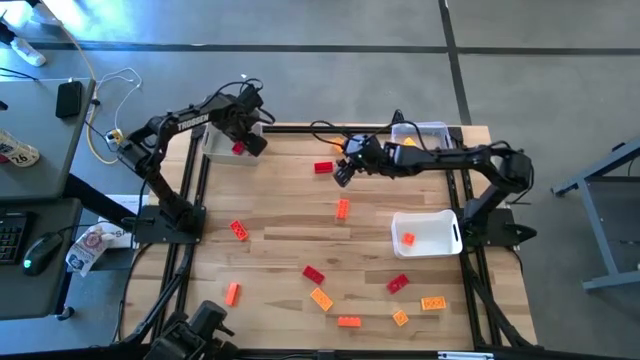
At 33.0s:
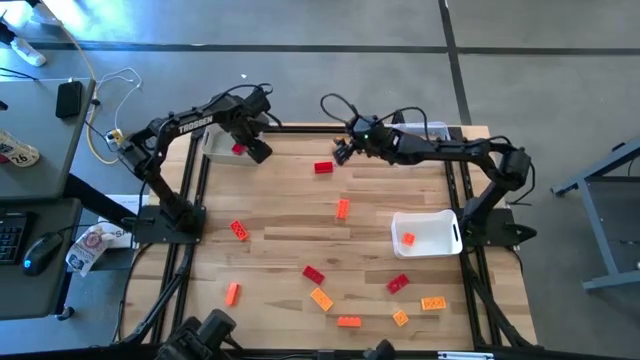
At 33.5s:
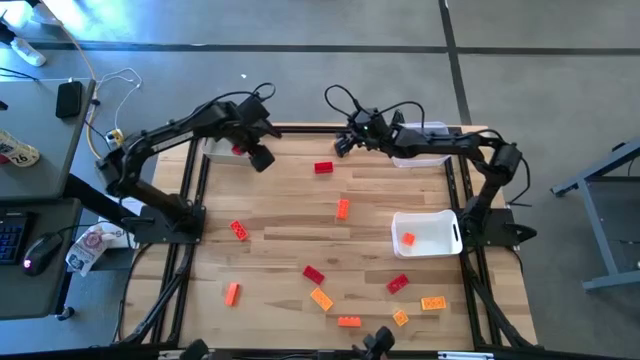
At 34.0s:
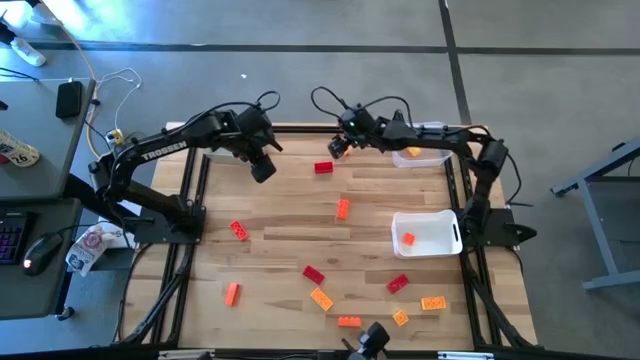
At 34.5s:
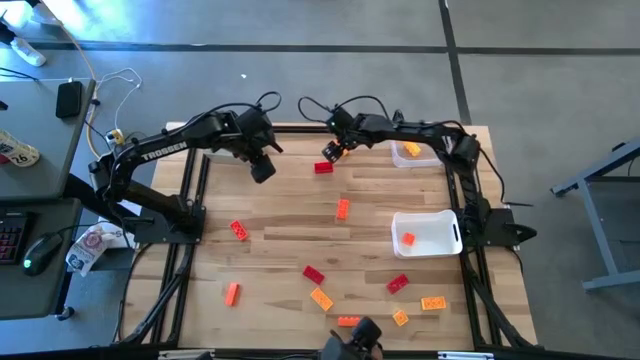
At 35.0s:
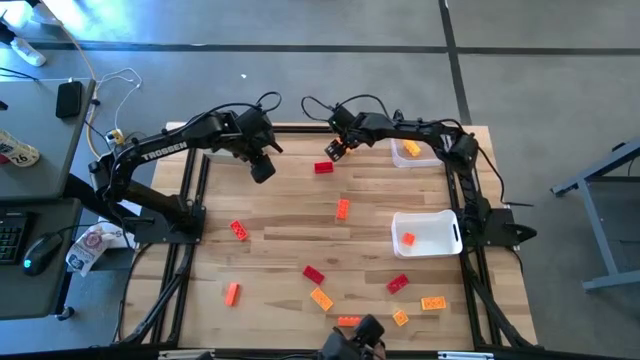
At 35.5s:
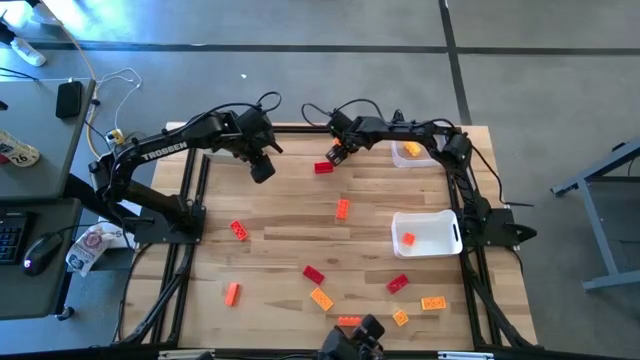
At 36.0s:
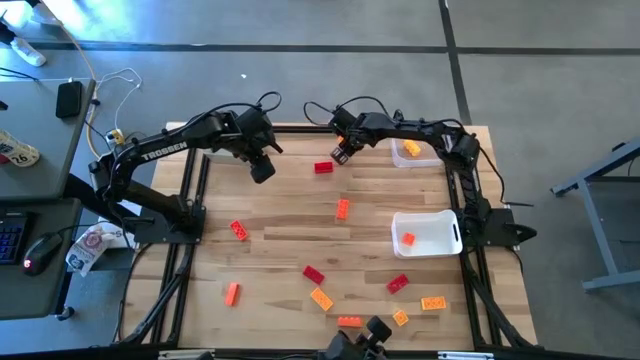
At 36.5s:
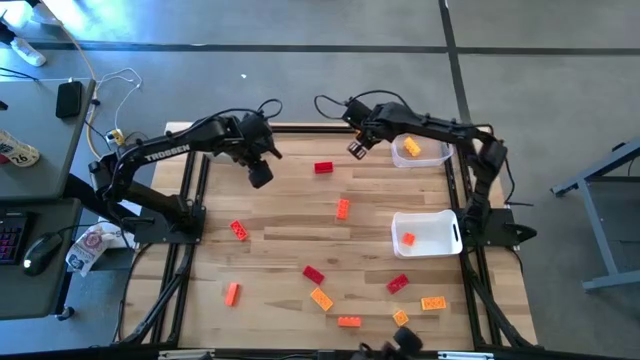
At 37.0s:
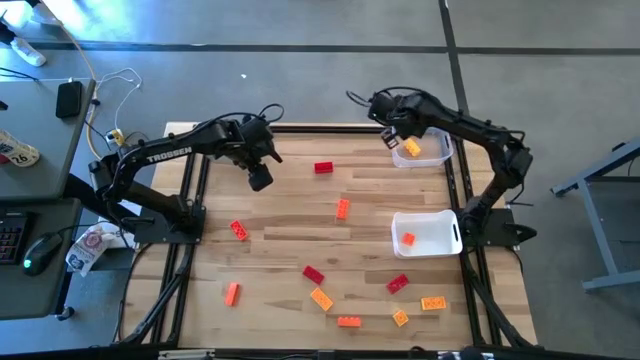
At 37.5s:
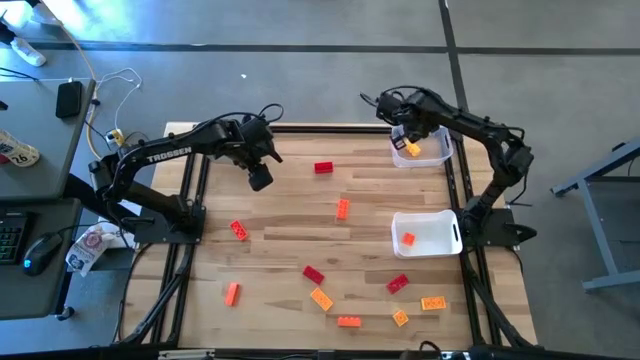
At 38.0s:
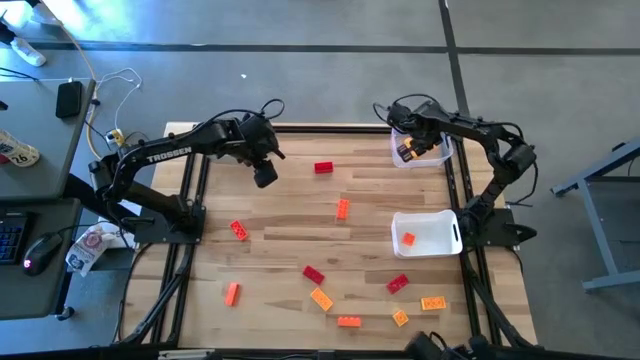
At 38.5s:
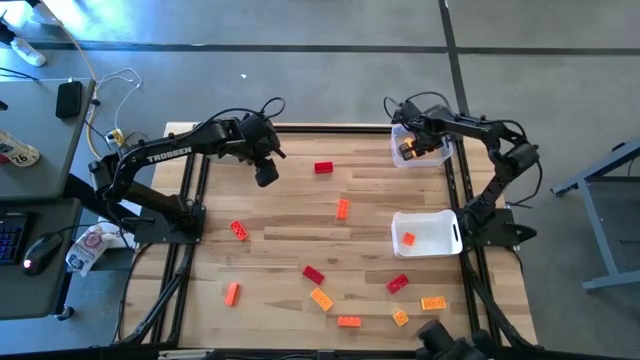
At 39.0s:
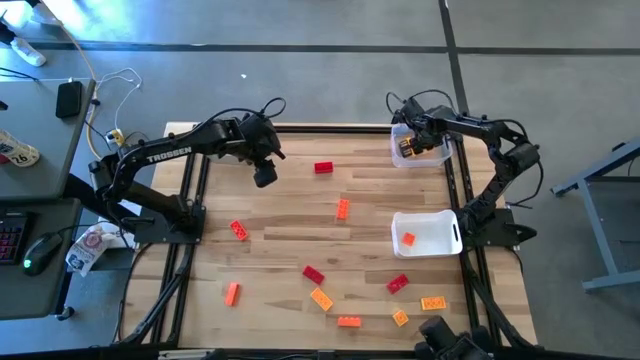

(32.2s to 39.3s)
Task: Sort & place blocks by color
Put the yellow game piece into the transparent bin

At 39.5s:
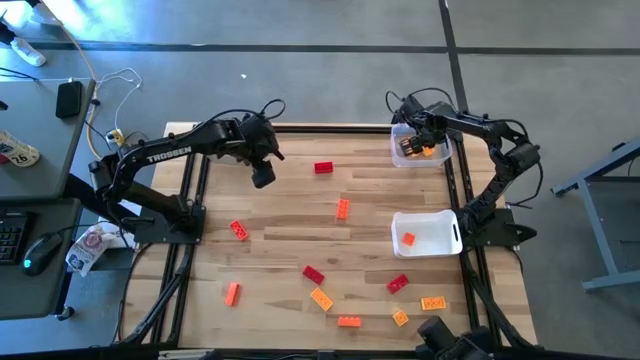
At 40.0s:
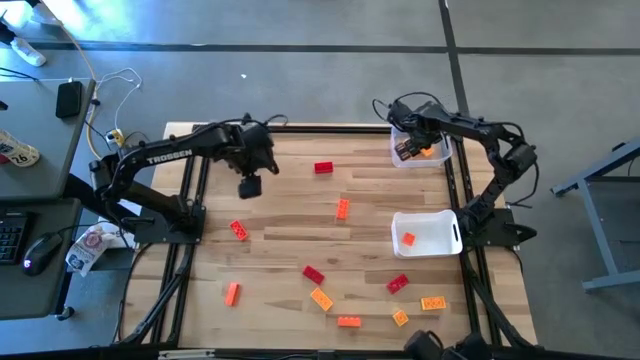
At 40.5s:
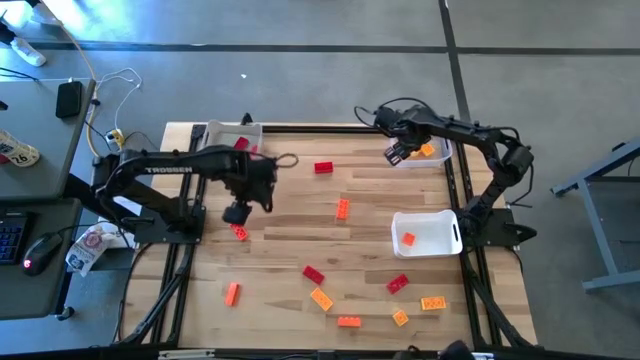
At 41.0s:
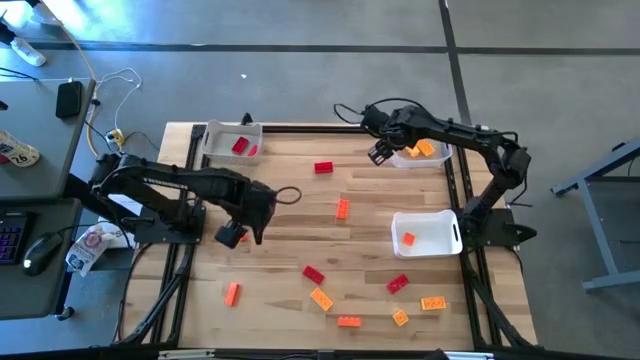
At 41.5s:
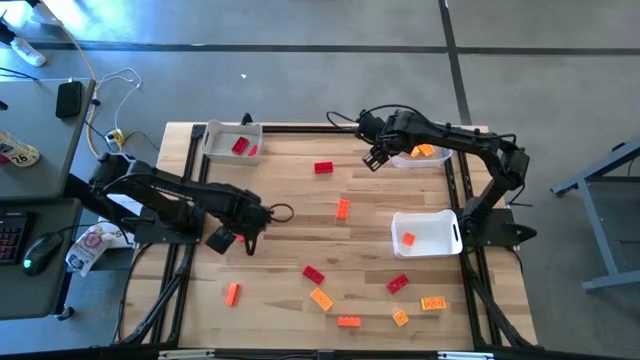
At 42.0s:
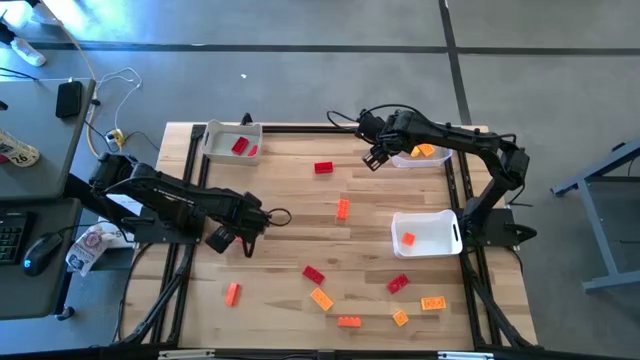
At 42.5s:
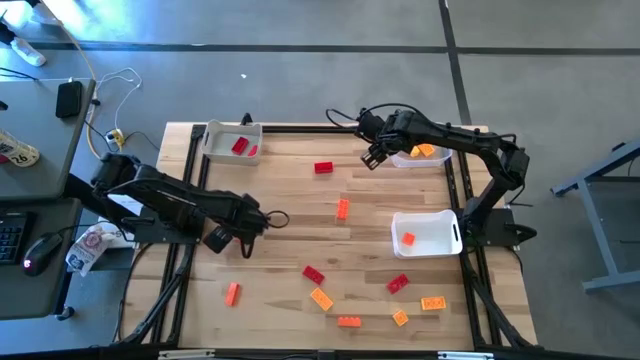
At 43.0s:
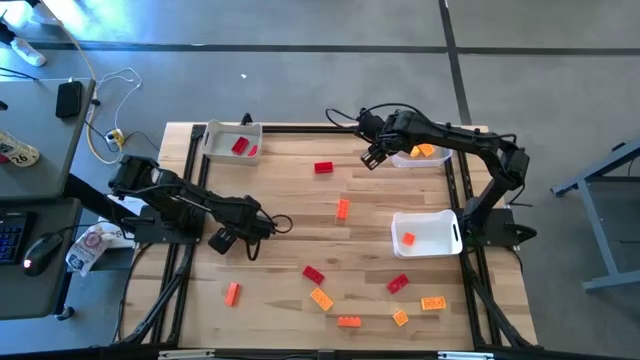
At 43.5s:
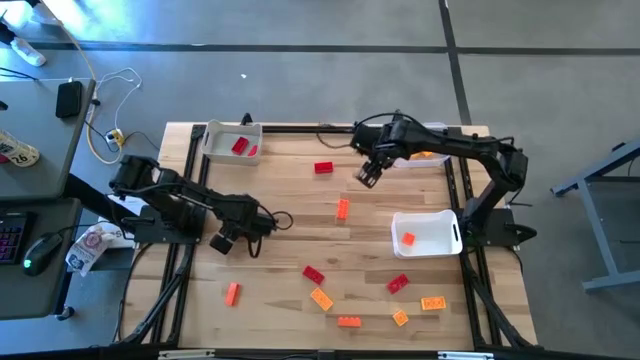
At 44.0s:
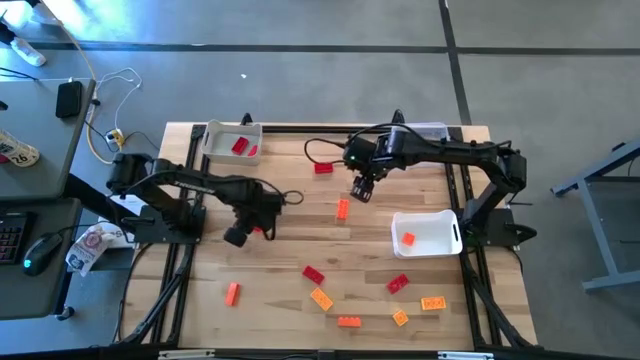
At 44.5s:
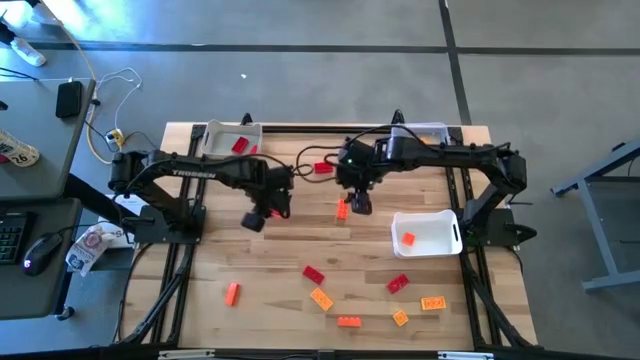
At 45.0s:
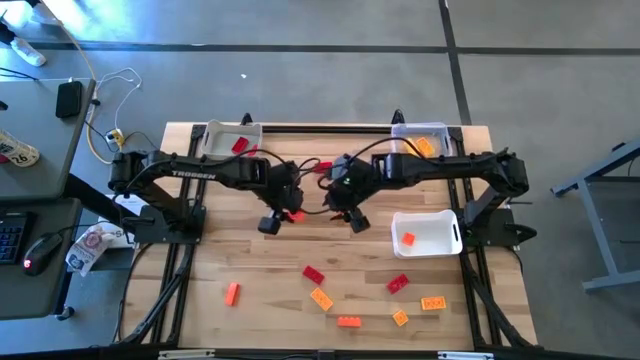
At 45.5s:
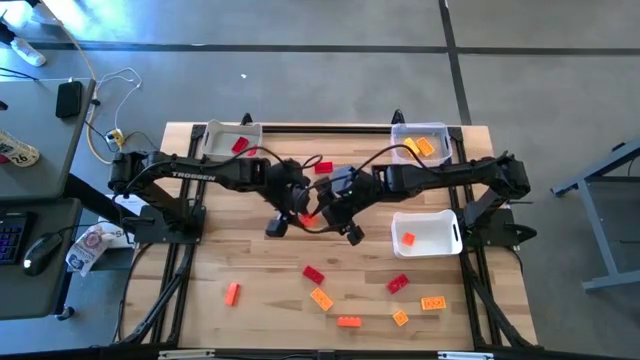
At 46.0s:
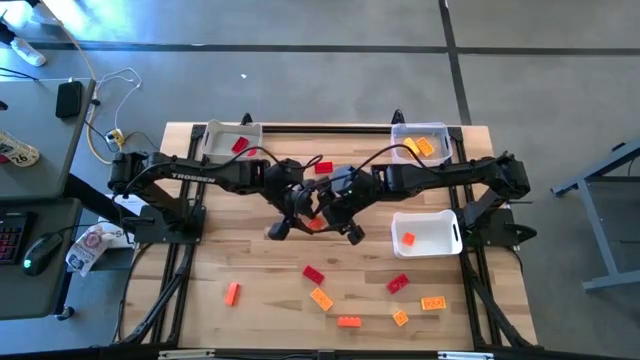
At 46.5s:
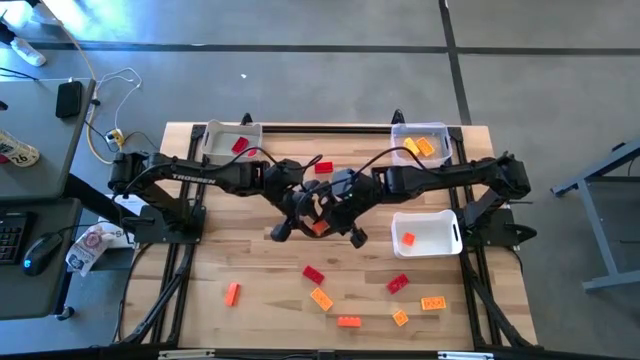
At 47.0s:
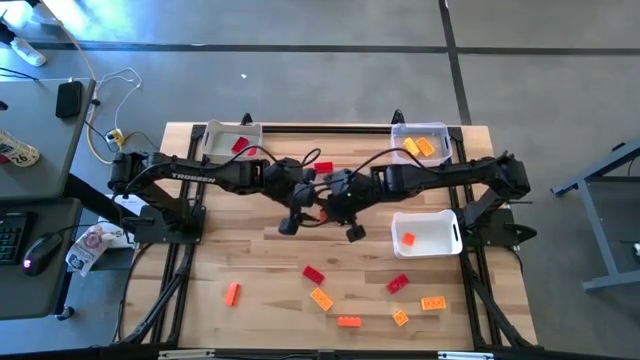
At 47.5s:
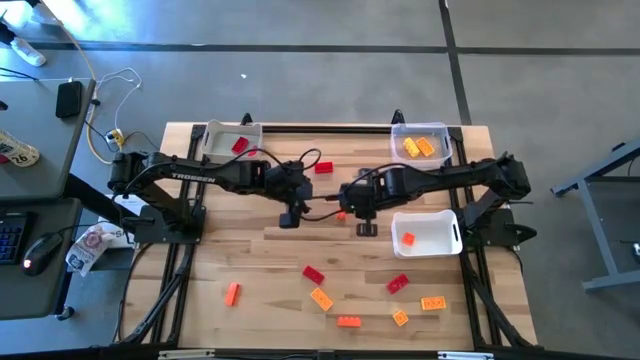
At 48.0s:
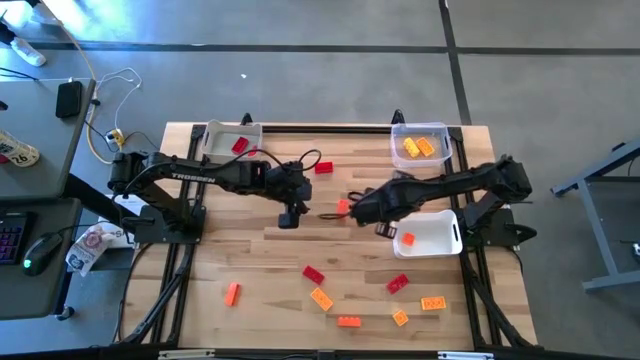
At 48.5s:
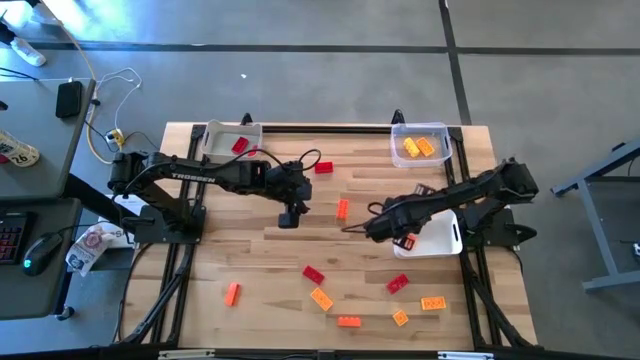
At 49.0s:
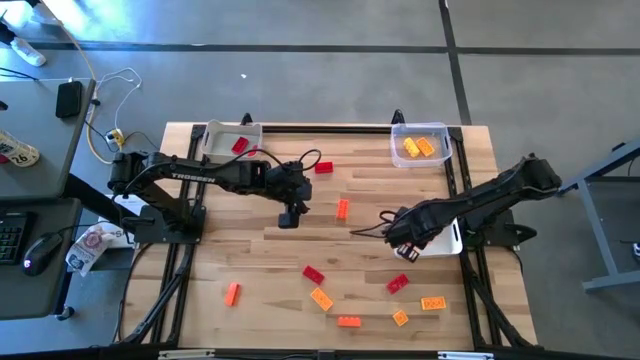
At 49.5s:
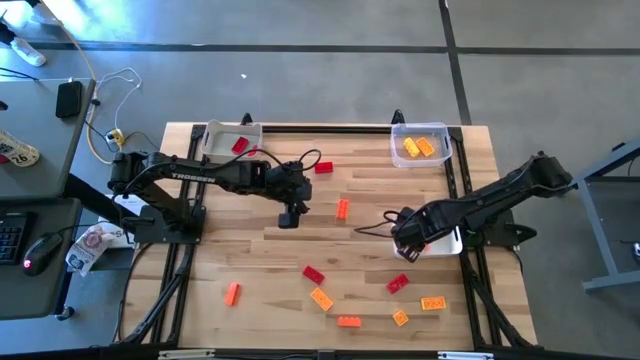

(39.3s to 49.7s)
Put the orange game piece into the white bin

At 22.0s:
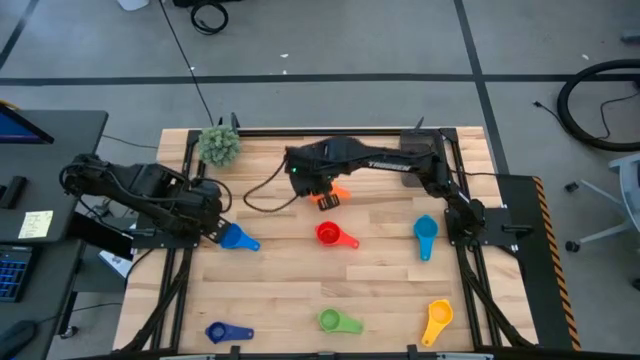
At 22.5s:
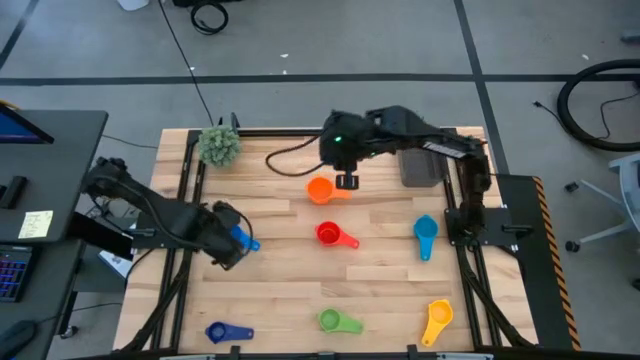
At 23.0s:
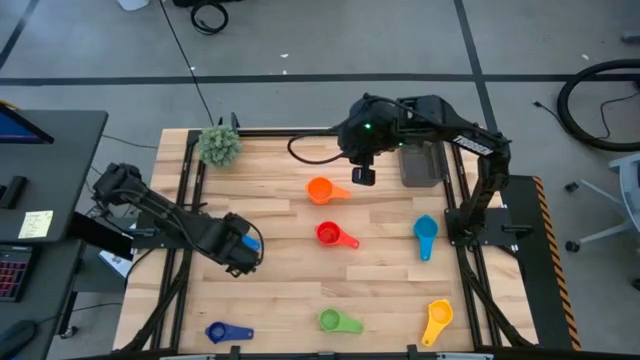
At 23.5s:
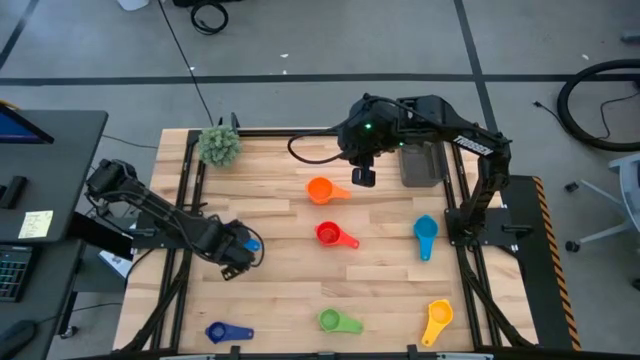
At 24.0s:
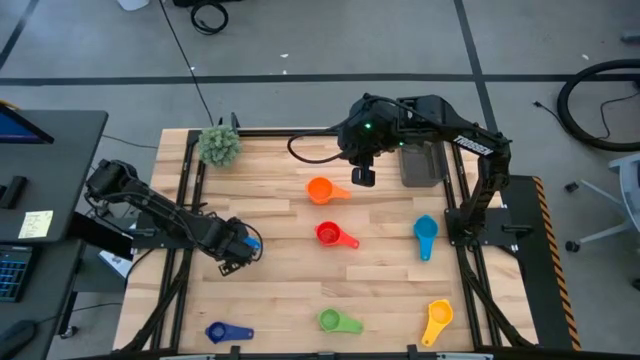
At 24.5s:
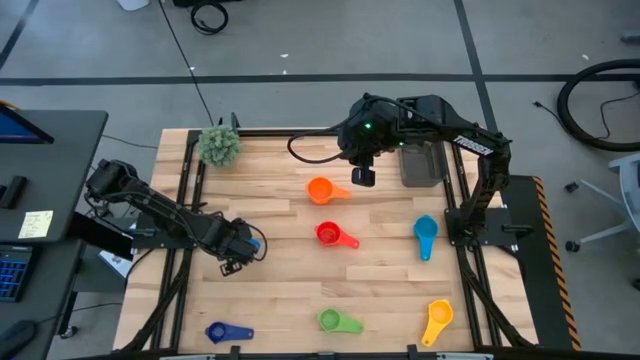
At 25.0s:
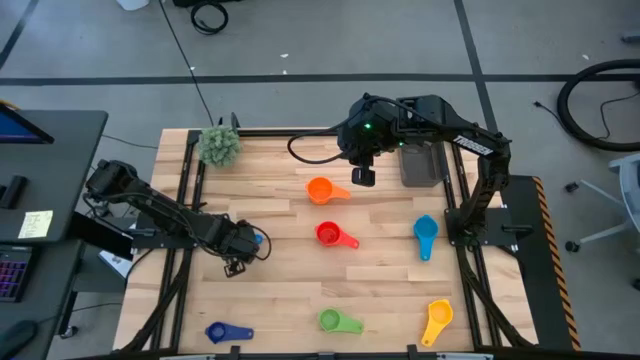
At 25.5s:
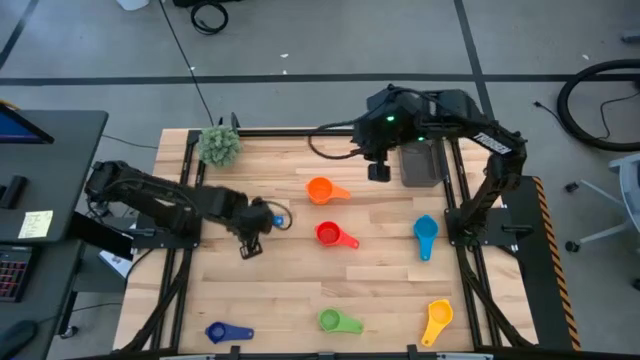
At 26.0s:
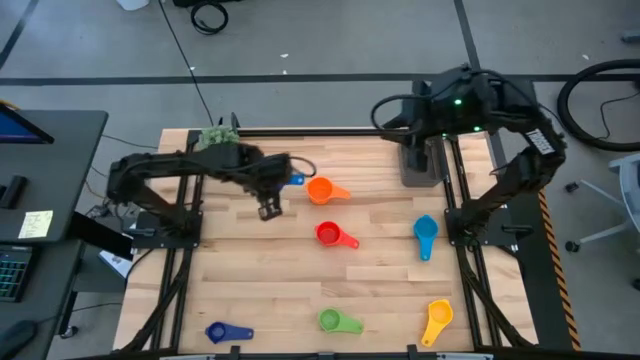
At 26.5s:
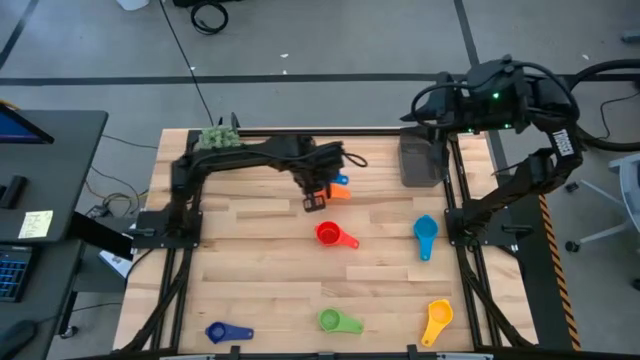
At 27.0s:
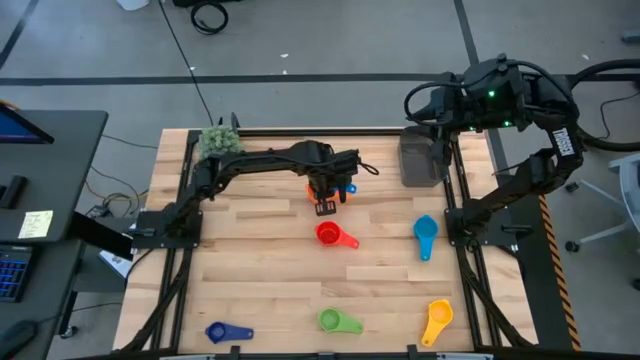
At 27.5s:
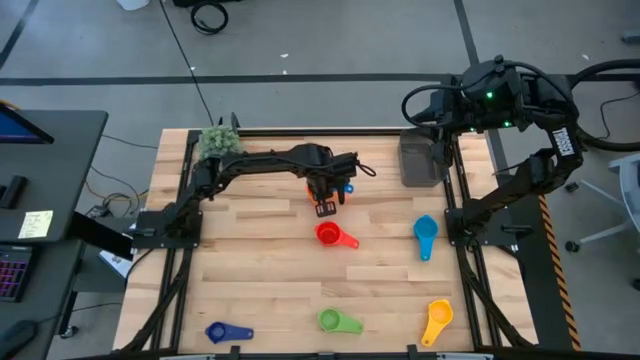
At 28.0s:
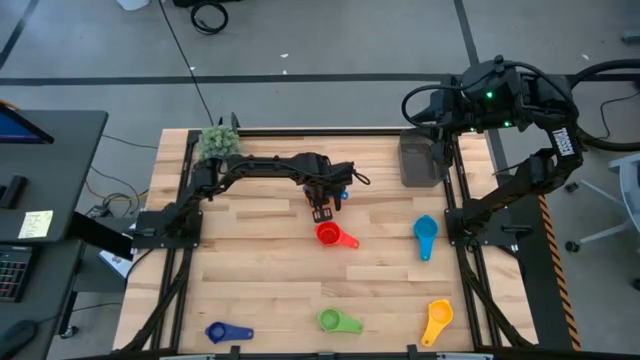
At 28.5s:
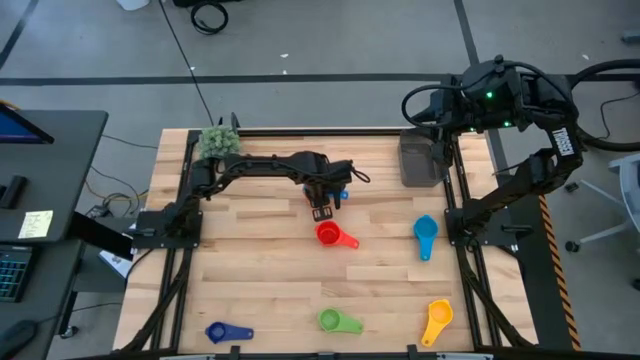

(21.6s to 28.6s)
Task: Nest measuring cups in basket
Stack the blue measuring cup on top of the orange measuring cup
